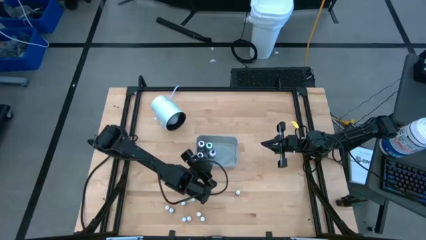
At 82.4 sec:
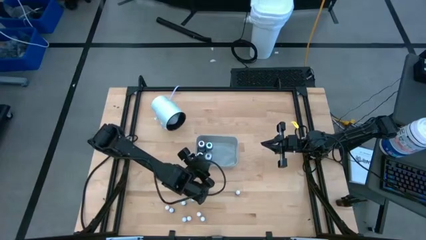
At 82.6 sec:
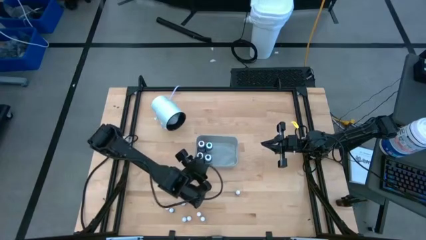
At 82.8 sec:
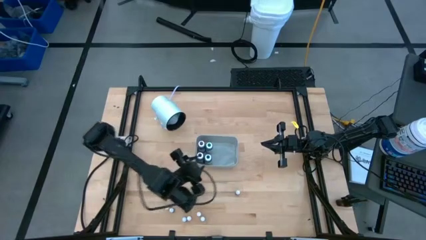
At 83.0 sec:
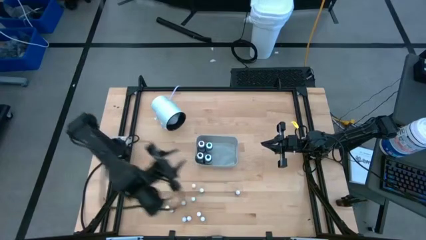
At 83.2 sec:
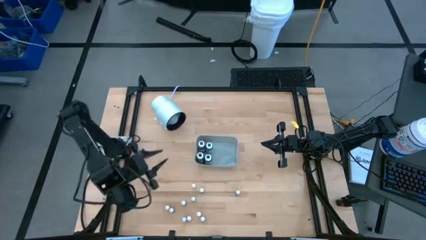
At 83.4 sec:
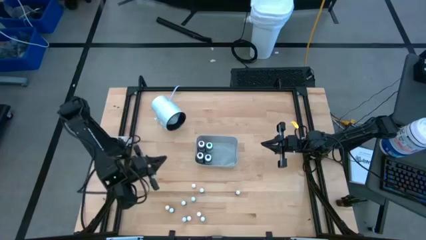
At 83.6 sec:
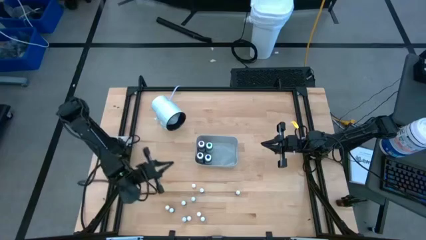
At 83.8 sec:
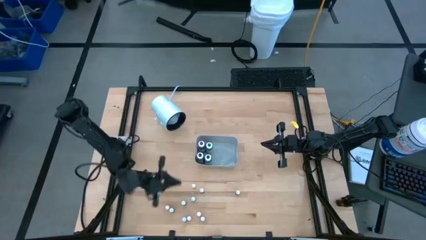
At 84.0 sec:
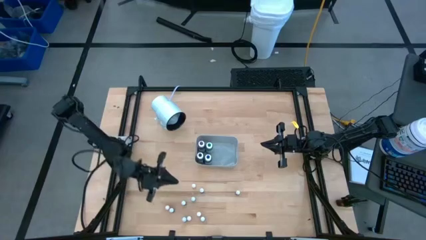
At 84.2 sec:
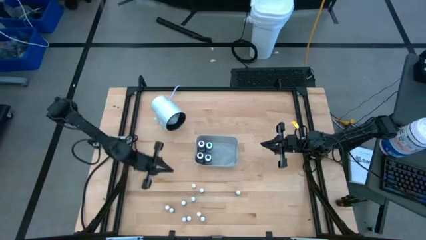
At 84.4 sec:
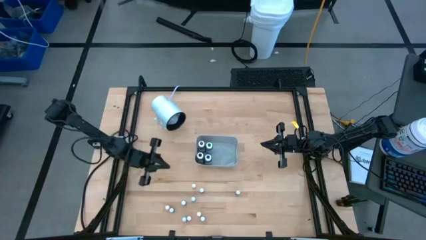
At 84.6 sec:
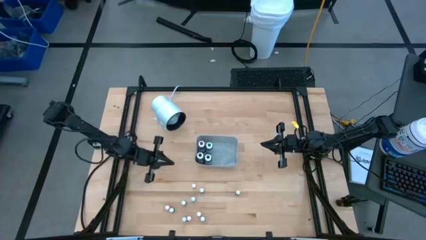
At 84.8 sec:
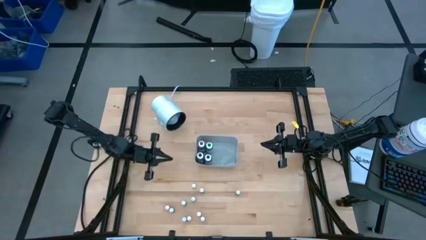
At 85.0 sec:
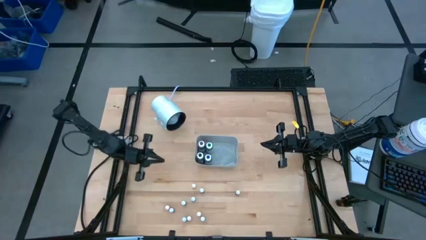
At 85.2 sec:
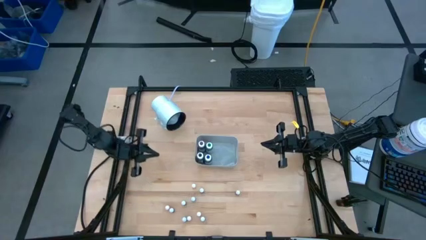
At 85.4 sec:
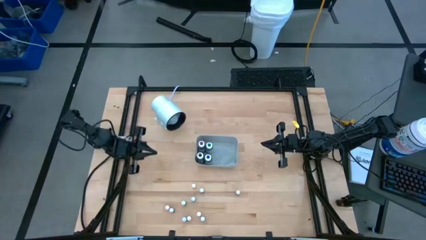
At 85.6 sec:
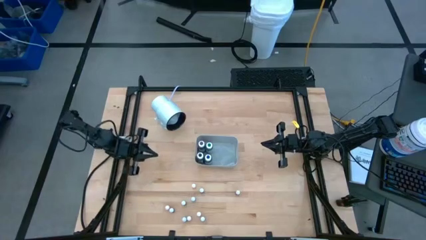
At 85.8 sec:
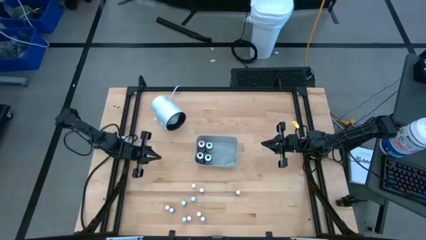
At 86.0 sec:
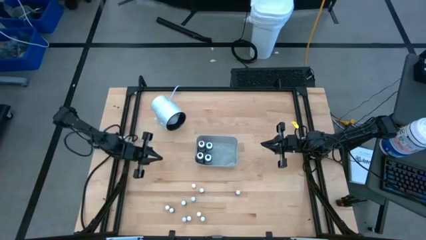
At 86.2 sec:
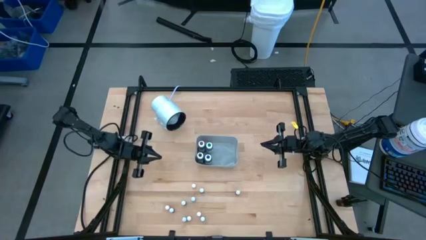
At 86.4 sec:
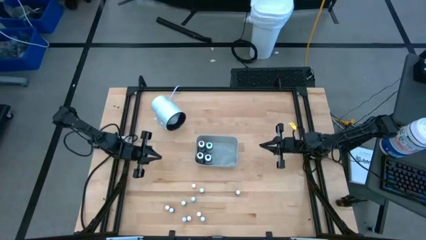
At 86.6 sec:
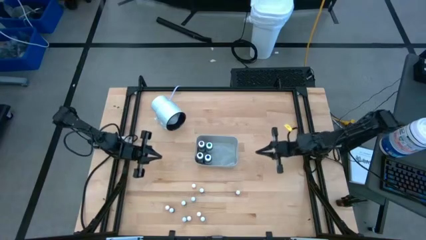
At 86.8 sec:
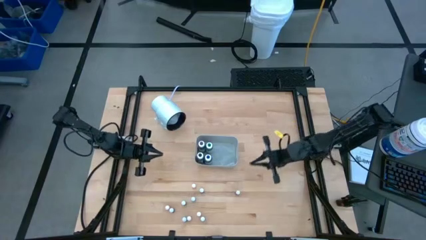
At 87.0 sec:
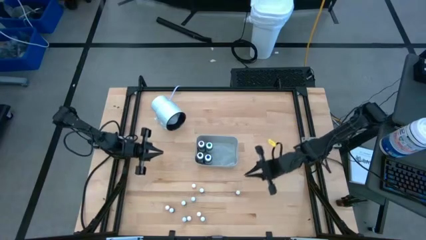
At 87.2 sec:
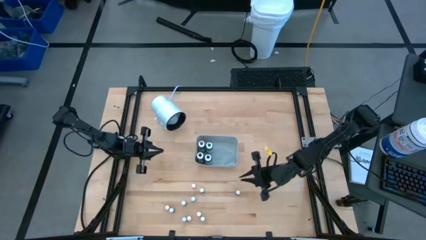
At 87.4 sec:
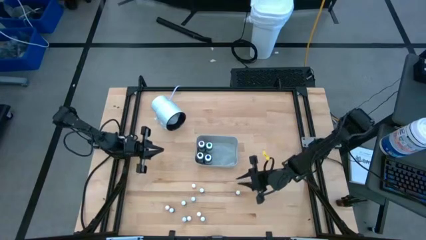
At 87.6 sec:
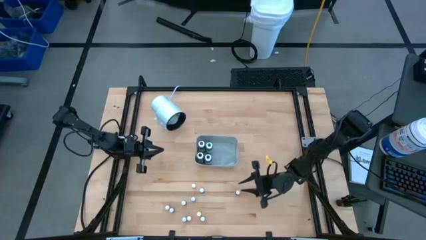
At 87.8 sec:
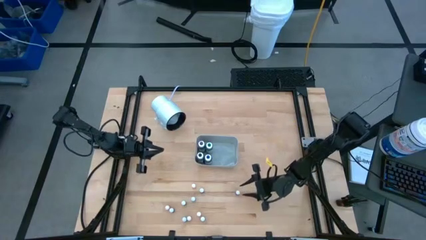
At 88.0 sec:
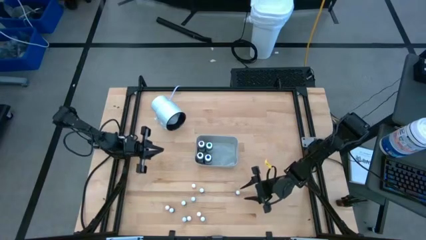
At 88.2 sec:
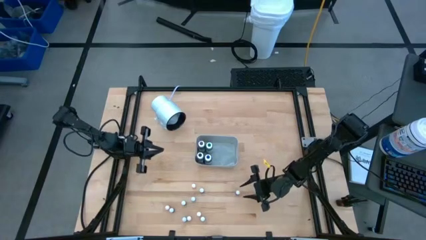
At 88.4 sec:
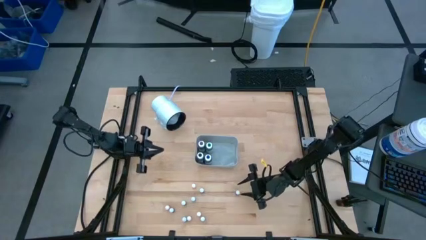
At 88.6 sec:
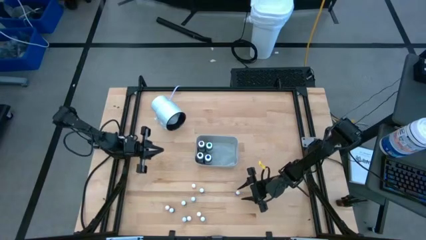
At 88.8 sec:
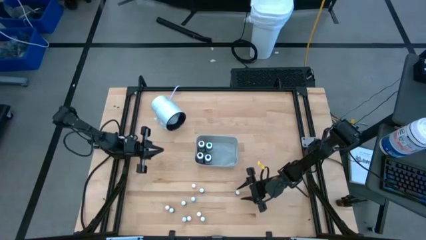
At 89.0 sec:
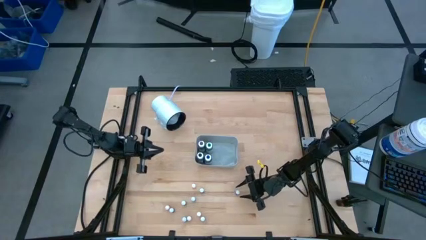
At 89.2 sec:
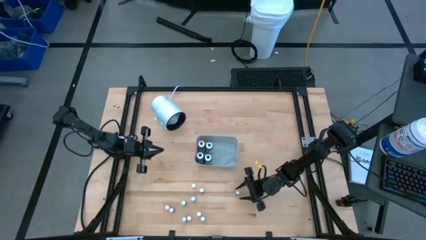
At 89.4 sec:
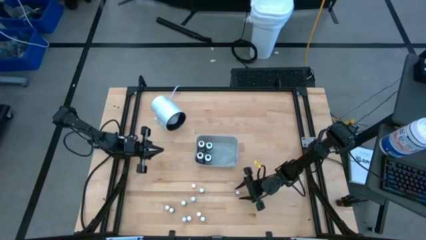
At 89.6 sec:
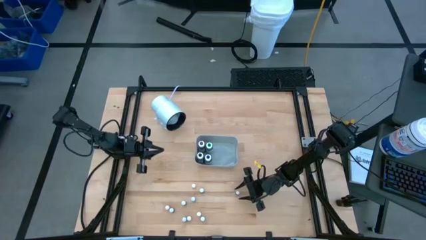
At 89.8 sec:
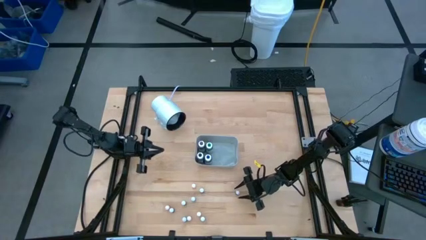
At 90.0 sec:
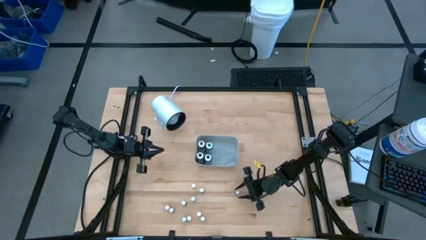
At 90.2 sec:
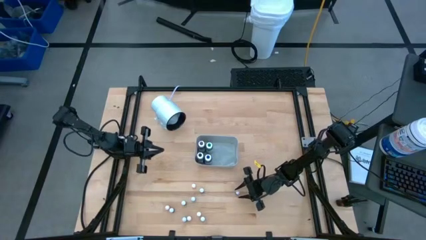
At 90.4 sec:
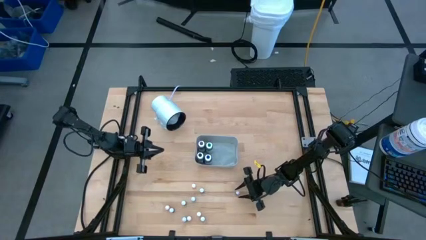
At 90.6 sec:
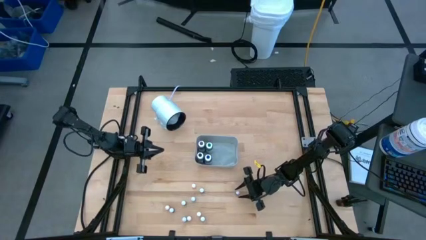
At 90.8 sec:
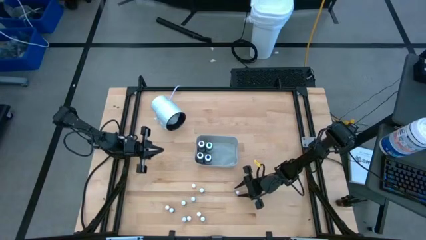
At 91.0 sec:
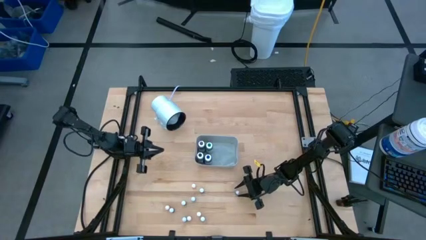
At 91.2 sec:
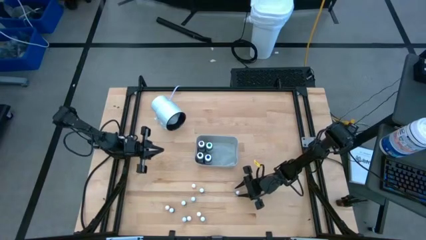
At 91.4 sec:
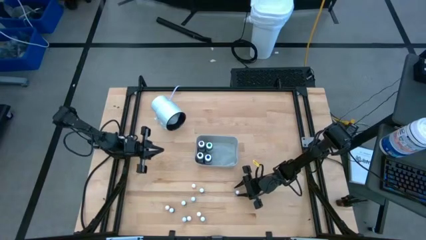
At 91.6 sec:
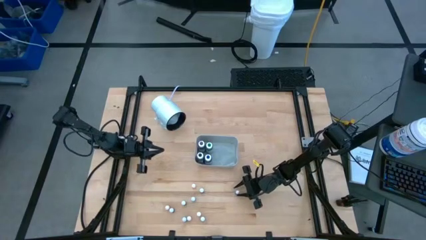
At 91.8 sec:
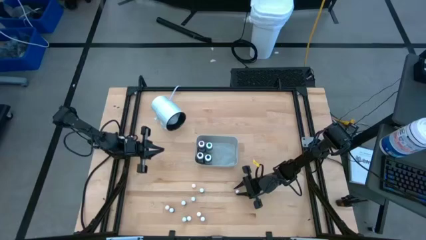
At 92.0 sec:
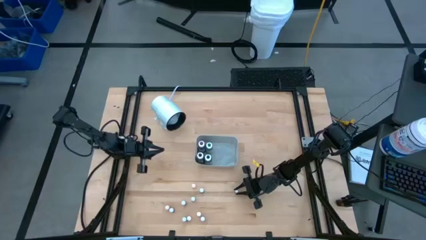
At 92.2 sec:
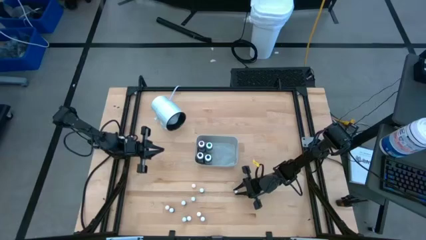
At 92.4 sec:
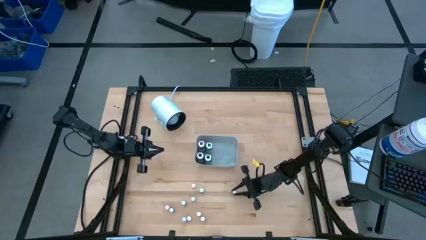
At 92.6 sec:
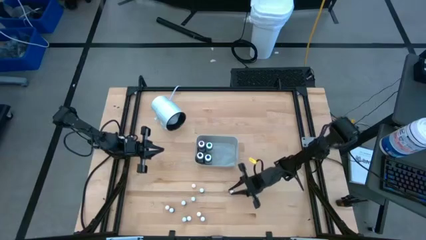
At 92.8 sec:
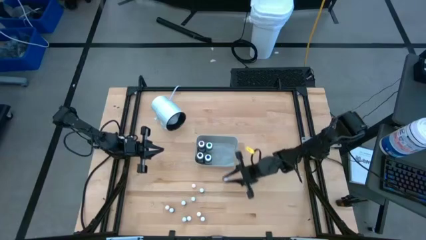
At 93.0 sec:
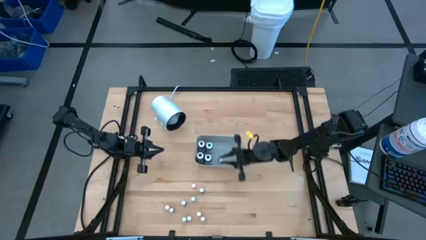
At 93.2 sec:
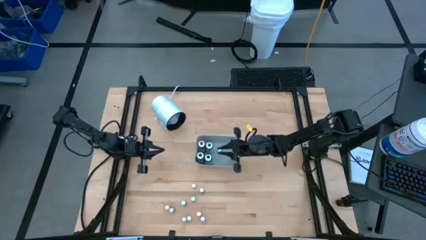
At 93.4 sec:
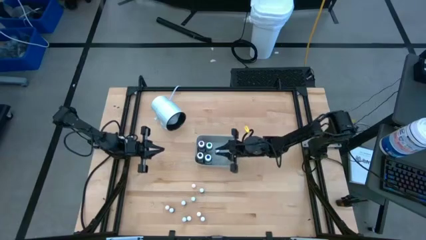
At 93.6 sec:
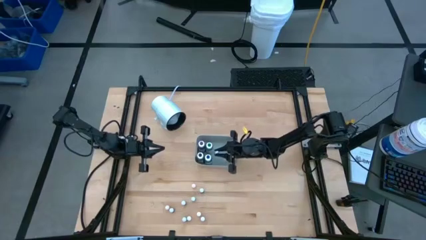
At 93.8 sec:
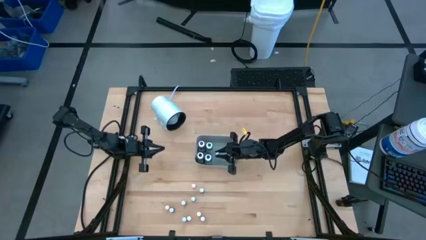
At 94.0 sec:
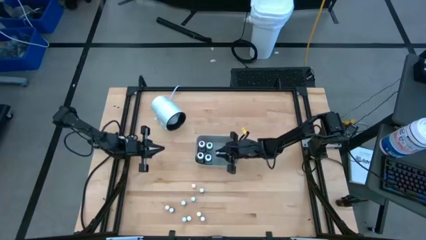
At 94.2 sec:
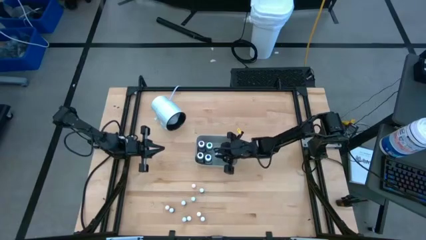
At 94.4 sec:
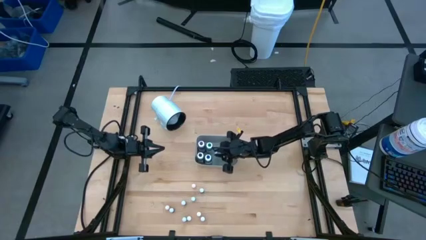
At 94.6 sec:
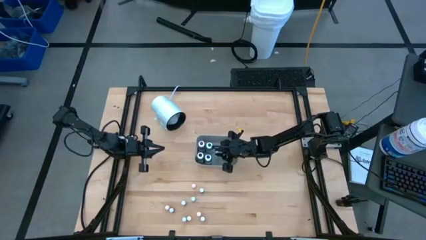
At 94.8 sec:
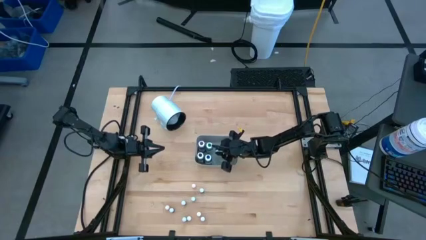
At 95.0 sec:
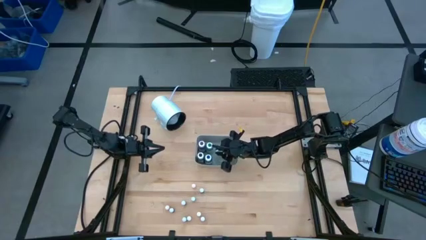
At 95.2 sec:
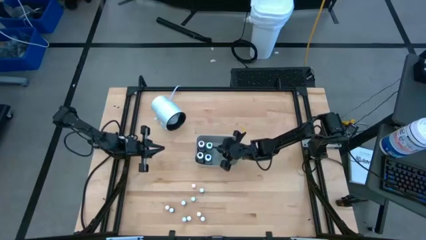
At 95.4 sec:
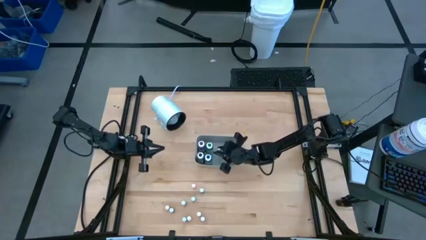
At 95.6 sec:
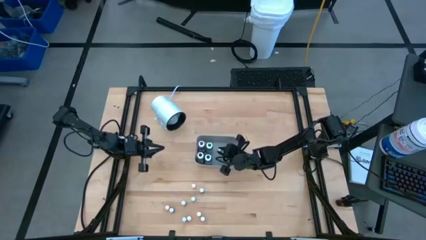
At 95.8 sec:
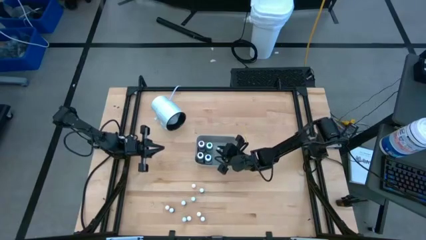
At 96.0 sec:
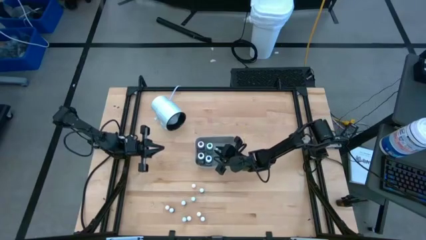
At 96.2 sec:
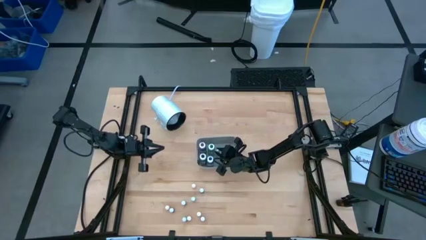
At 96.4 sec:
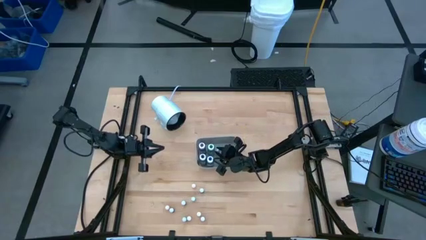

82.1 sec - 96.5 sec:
Task: Pick & Place food coloring
Put the small orange food coloring bottle into the gray bin

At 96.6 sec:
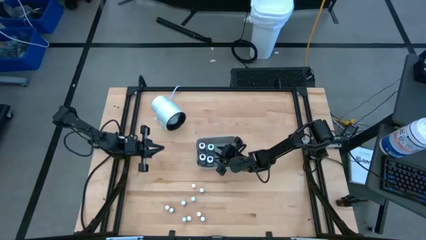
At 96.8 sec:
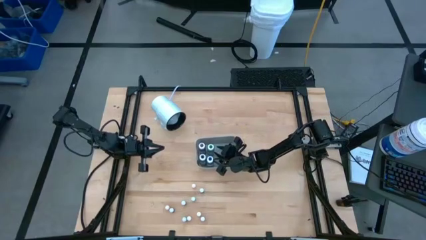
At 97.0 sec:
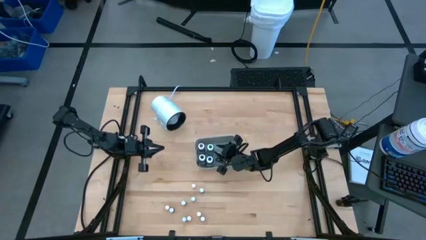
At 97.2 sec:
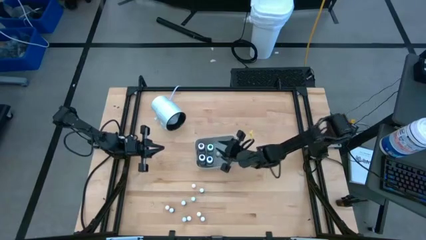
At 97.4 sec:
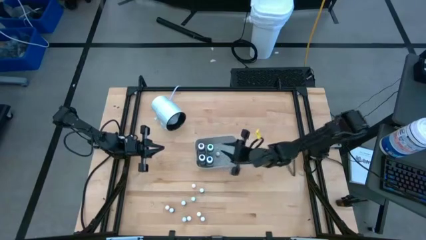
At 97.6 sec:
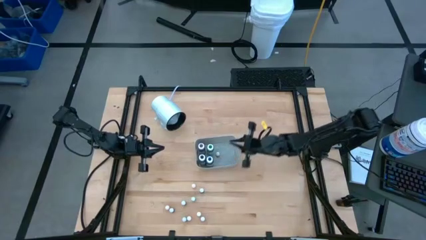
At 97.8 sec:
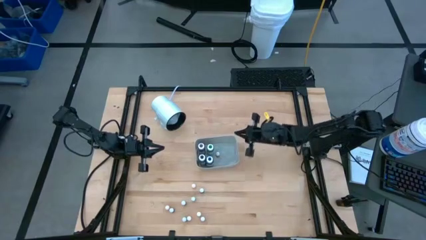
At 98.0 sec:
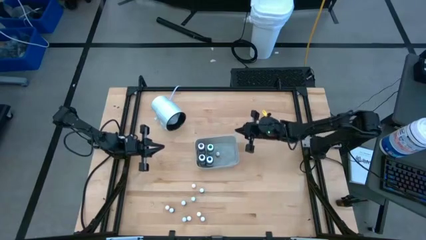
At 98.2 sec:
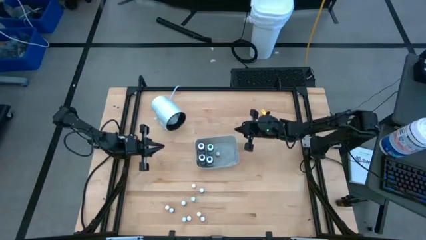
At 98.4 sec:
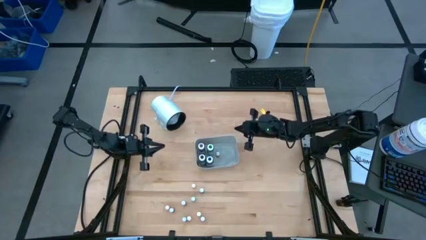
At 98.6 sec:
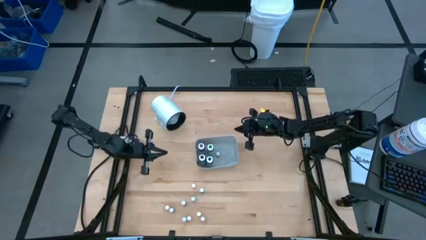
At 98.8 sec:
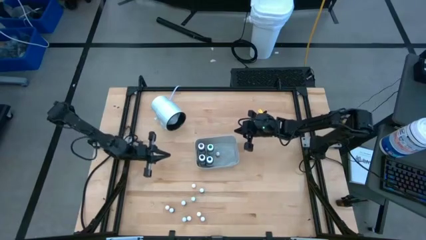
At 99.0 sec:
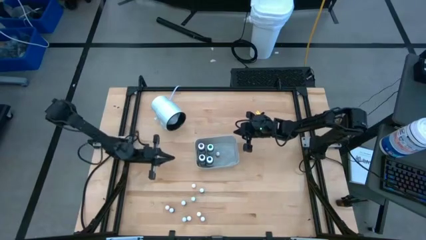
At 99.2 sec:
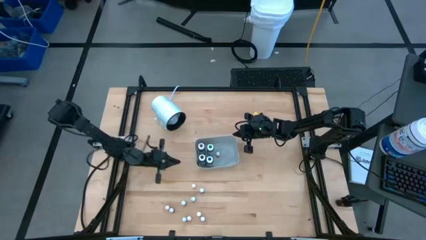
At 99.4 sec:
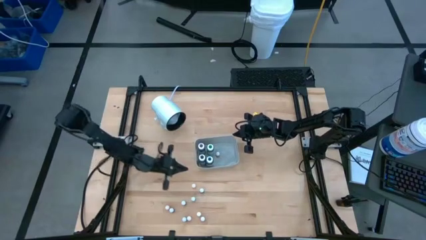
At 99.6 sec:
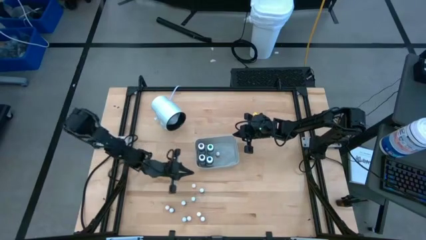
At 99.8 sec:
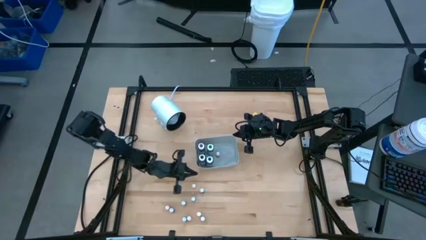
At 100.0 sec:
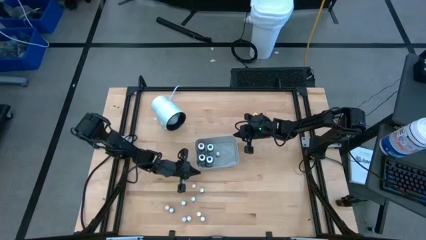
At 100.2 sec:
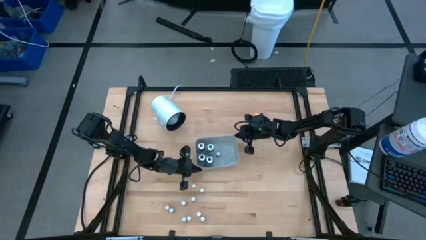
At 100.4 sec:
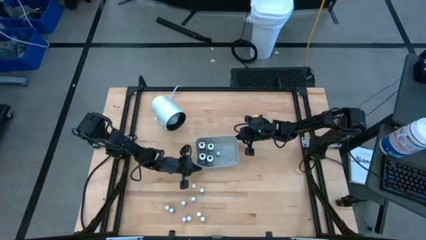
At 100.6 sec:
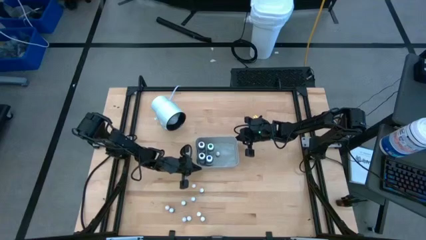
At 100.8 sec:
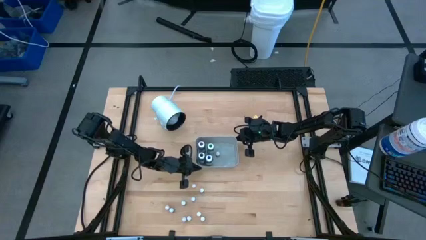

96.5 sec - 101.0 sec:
Adjust the gray bin
